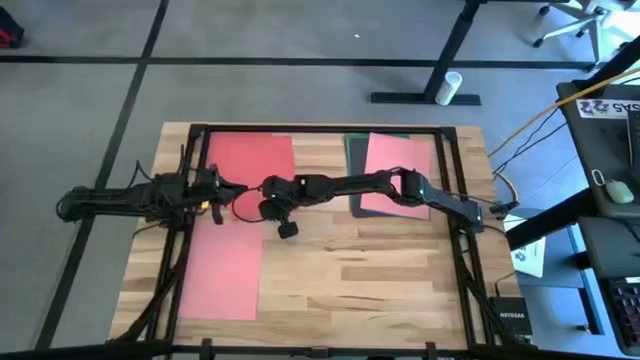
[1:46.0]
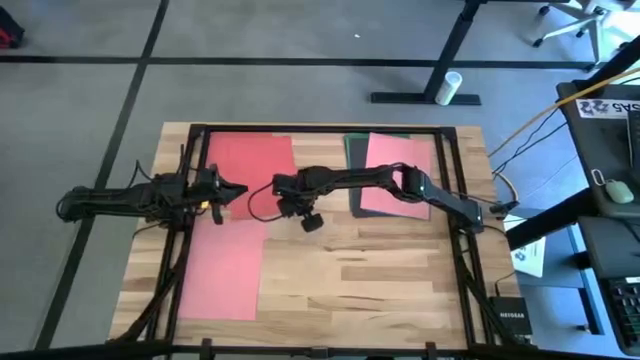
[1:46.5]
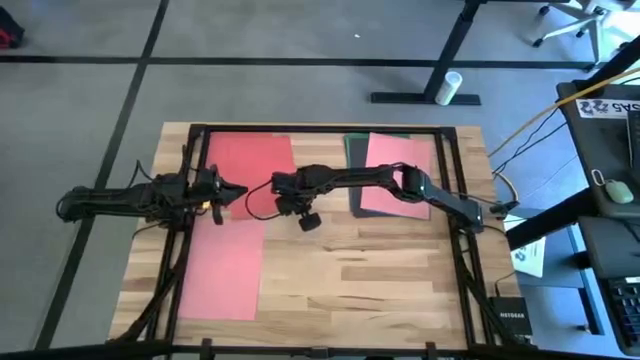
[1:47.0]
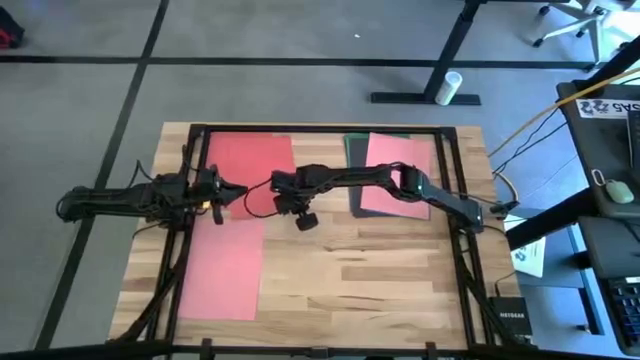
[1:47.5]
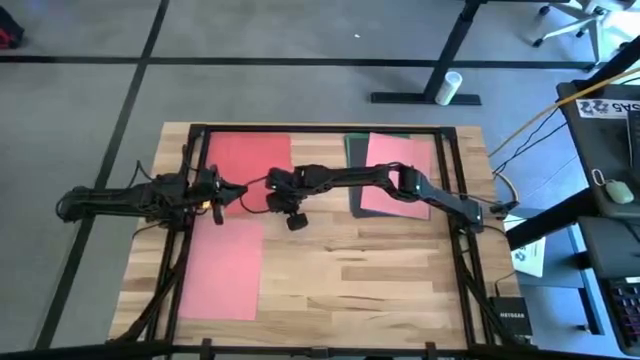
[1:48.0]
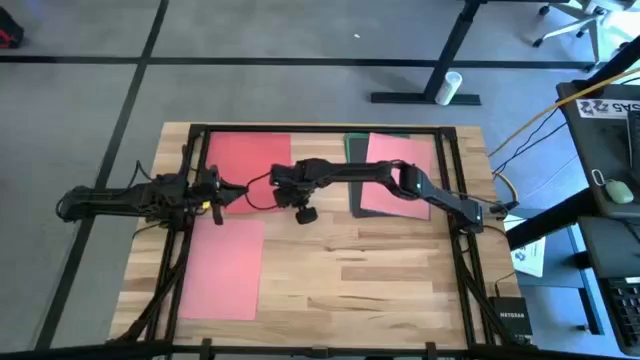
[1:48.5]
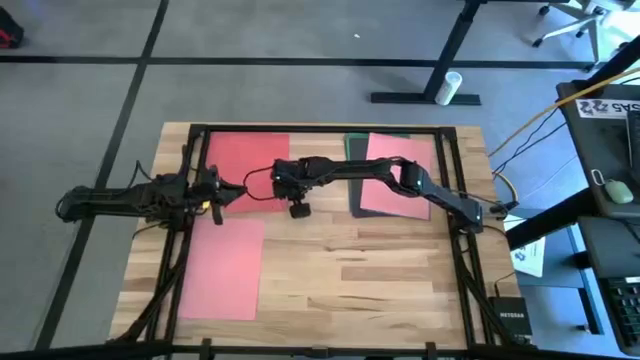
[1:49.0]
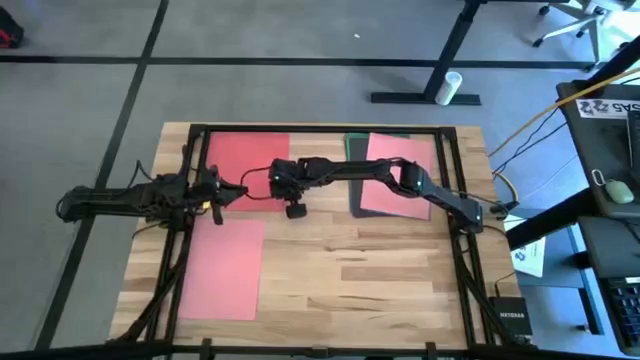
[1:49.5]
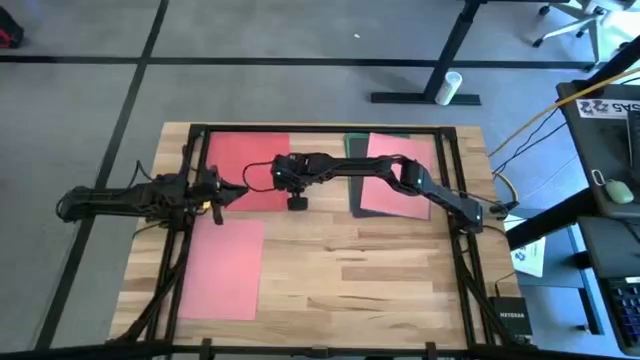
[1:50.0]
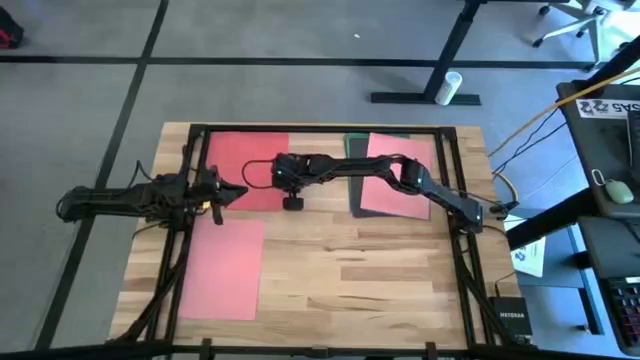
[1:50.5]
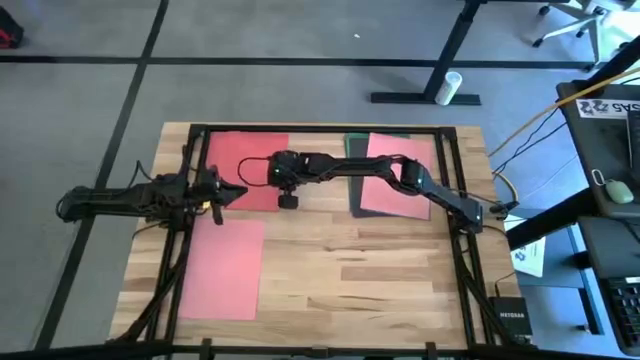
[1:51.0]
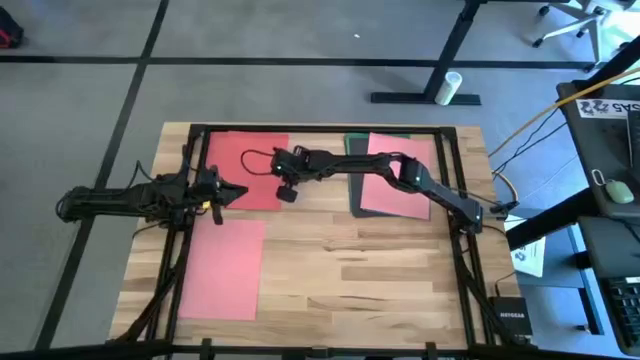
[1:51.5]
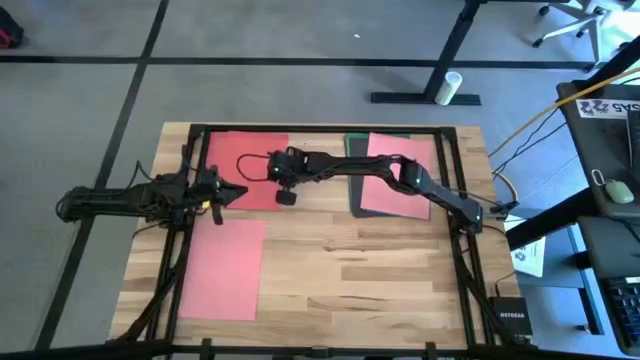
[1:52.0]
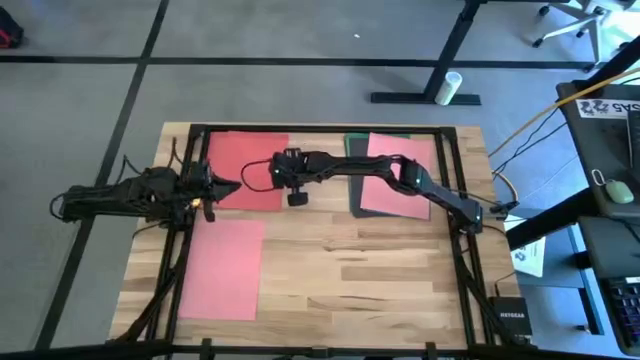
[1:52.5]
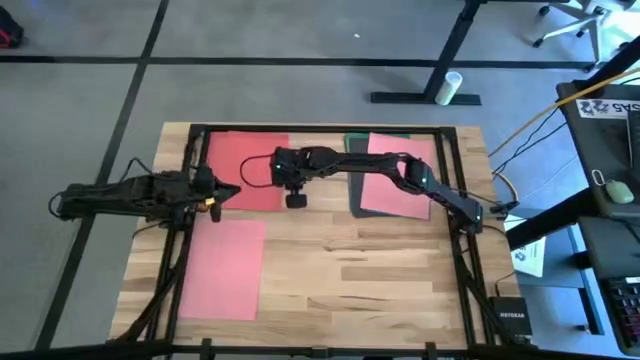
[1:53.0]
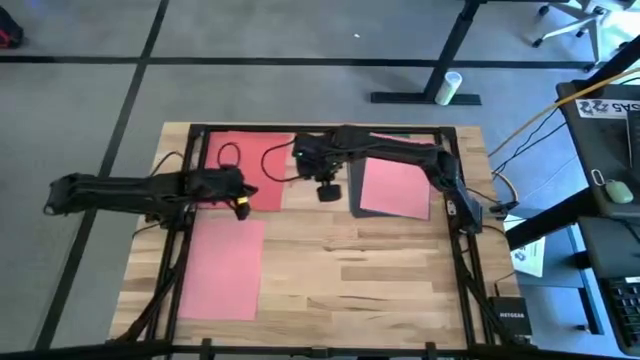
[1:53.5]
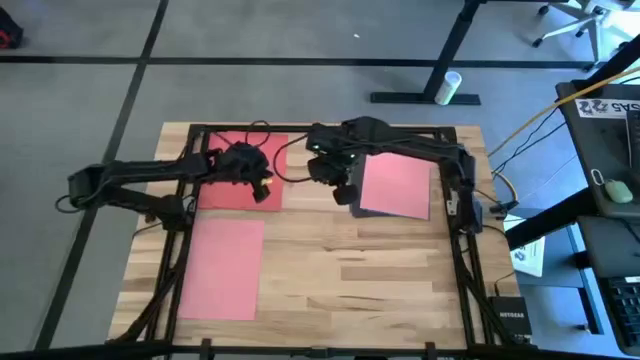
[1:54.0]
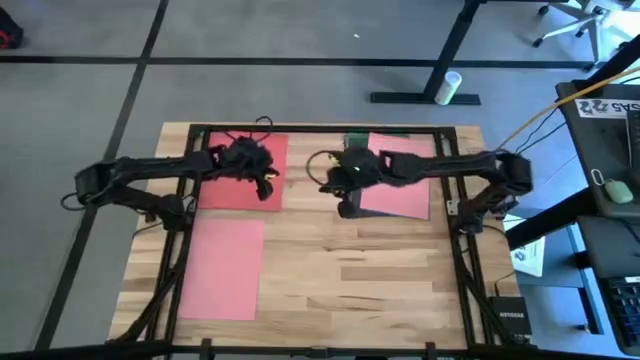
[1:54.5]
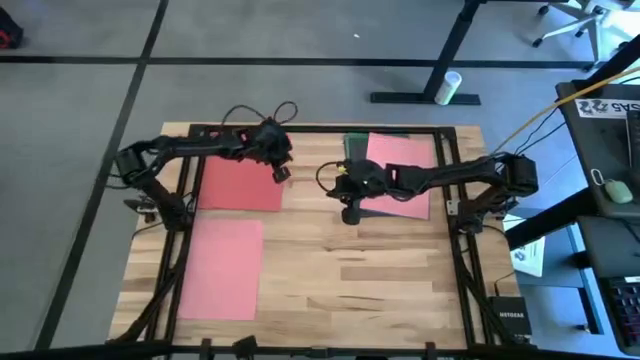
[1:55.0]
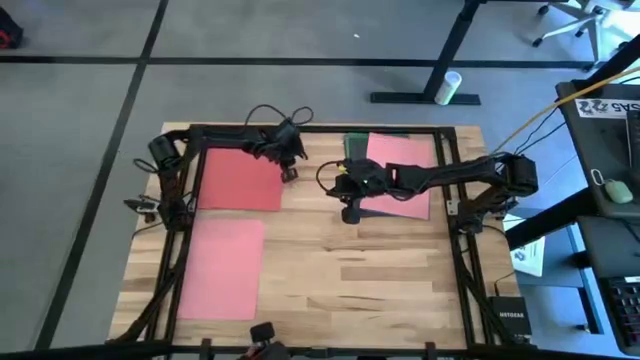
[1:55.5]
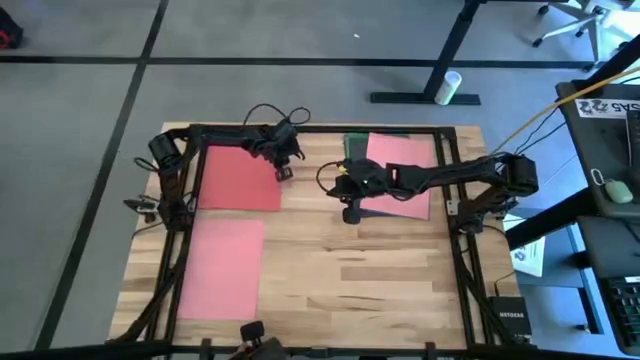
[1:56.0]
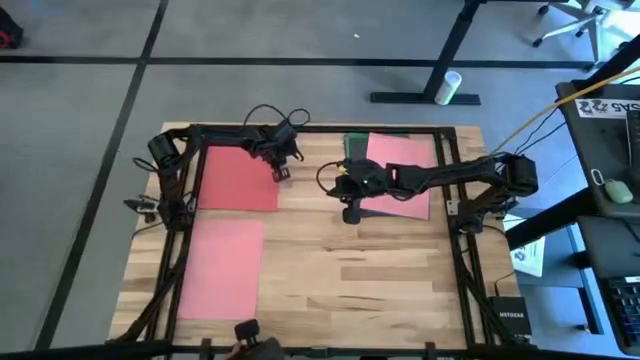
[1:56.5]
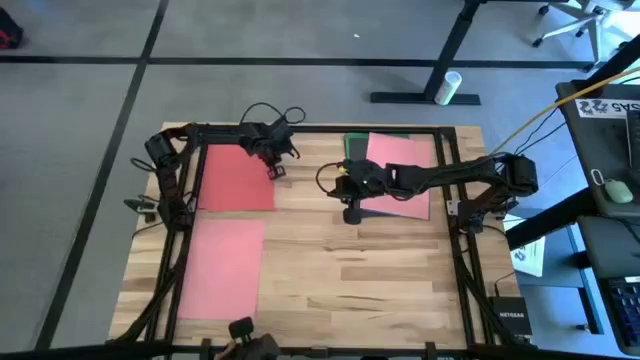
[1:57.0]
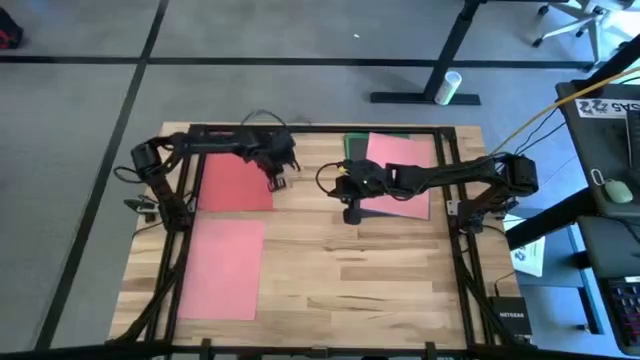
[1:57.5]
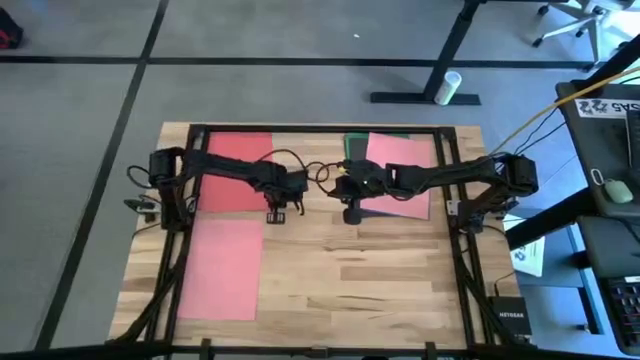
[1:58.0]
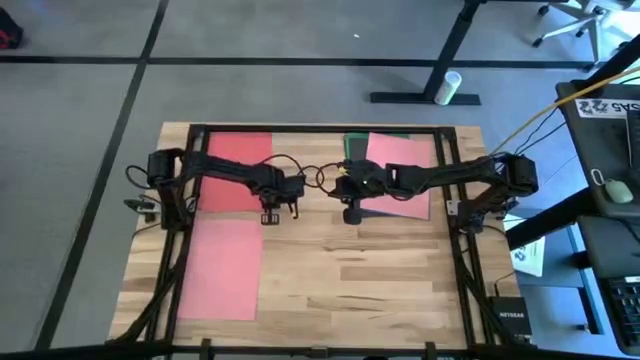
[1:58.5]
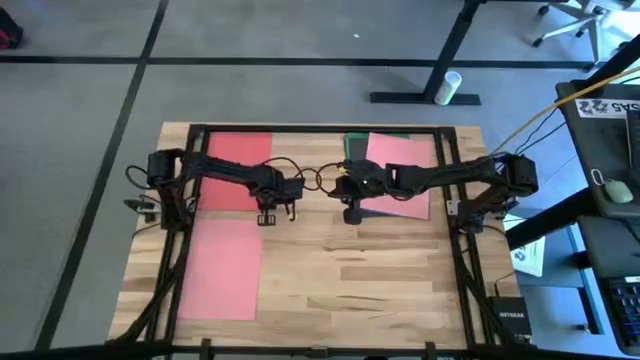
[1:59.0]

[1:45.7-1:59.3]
Task: Organize paper
Stack the red paper on top of the red papers

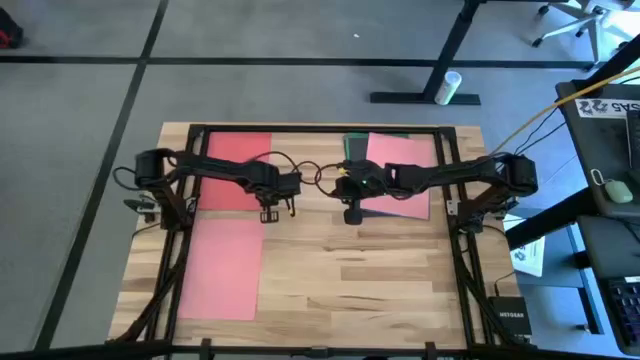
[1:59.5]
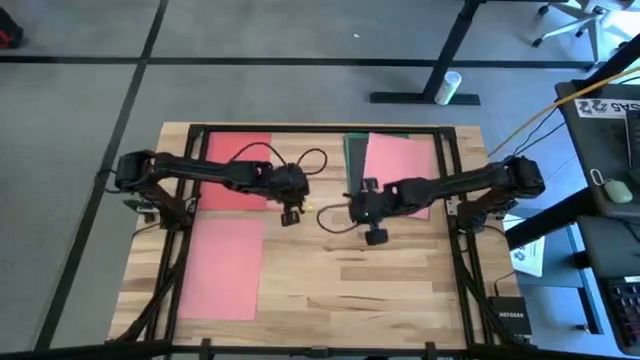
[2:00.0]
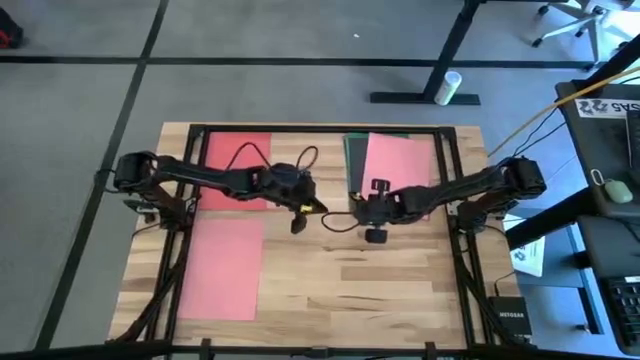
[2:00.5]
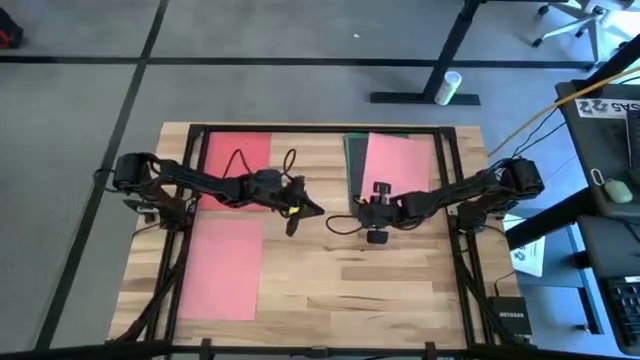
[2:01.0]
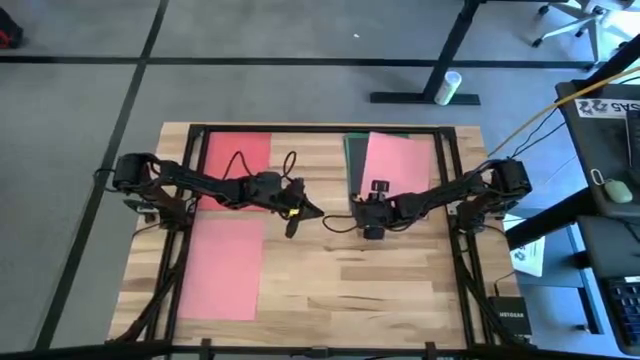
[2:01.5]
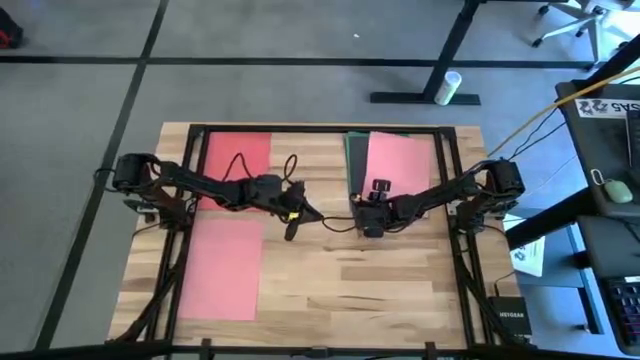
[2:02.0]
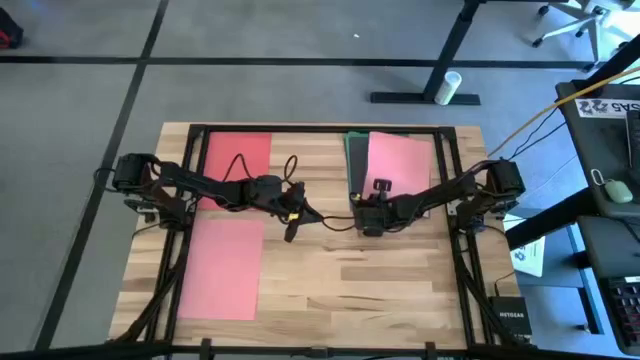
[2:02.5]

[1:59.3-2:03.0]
Stack the pink paper on top of the pink papers

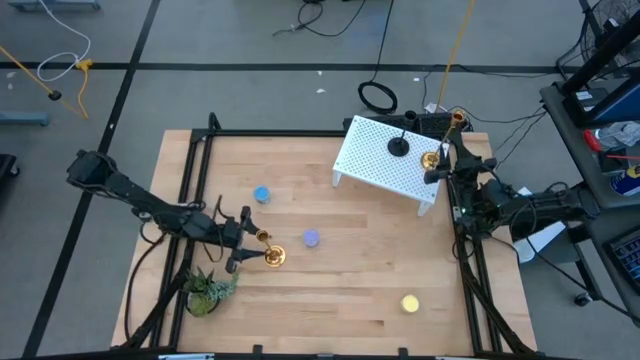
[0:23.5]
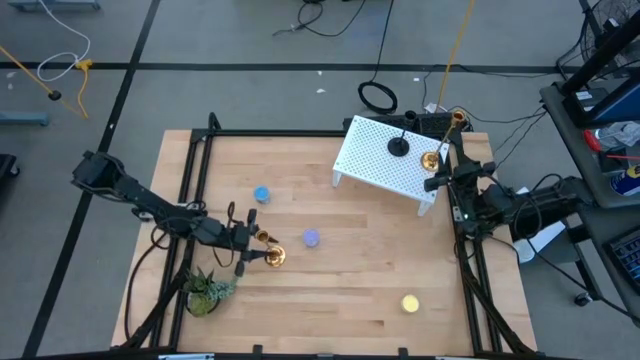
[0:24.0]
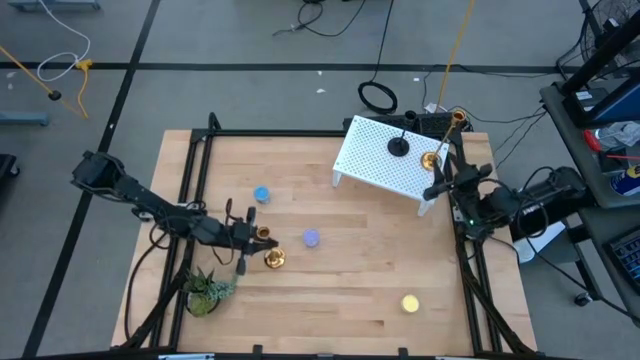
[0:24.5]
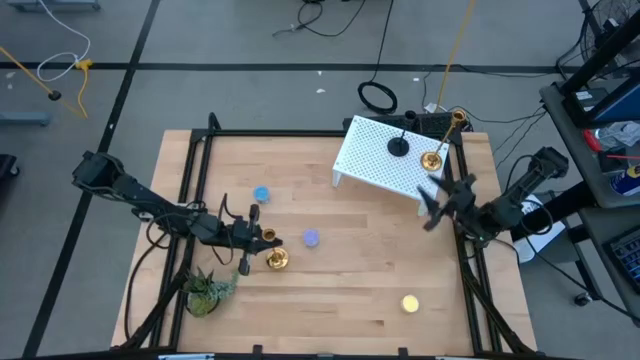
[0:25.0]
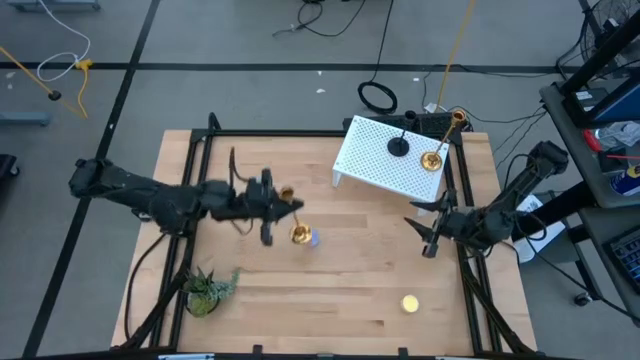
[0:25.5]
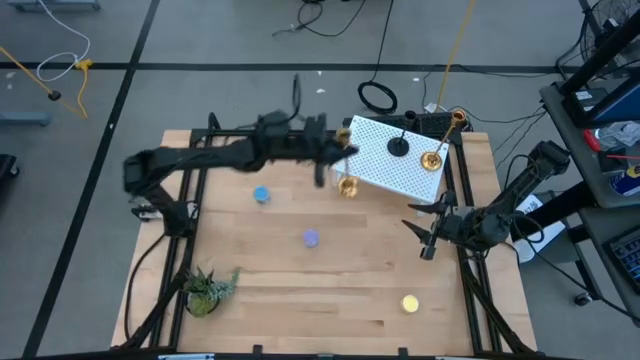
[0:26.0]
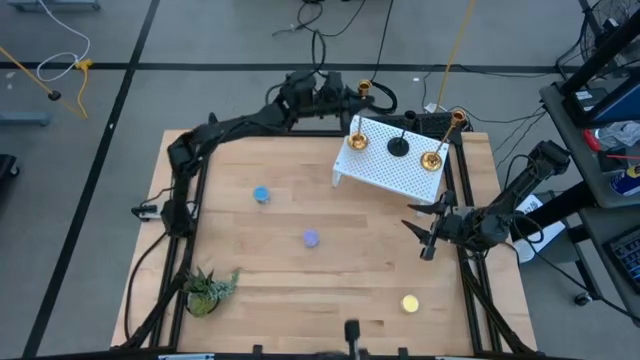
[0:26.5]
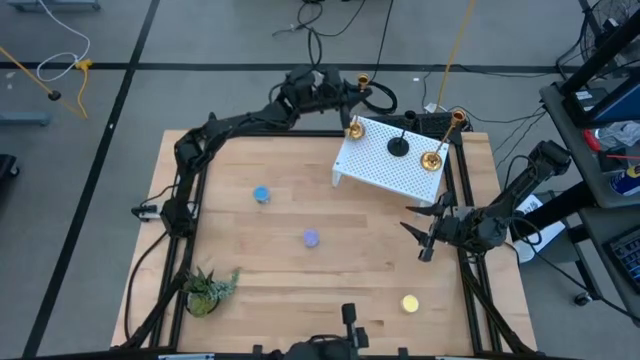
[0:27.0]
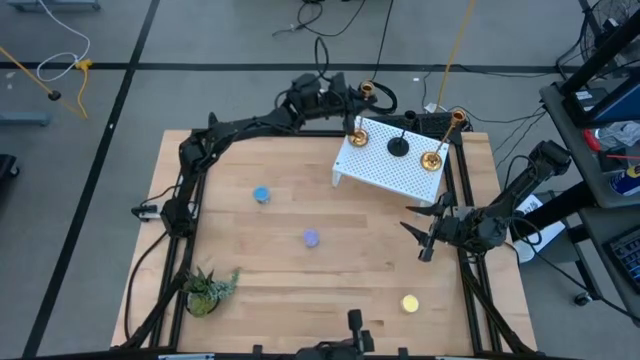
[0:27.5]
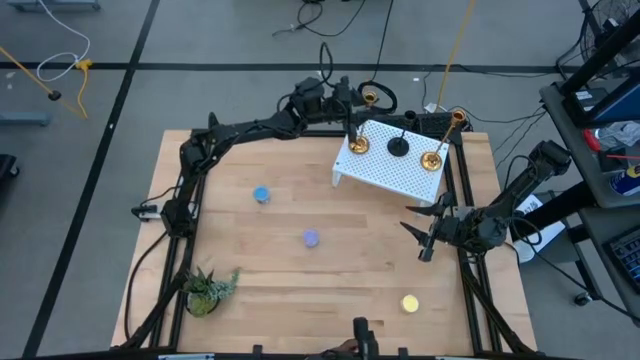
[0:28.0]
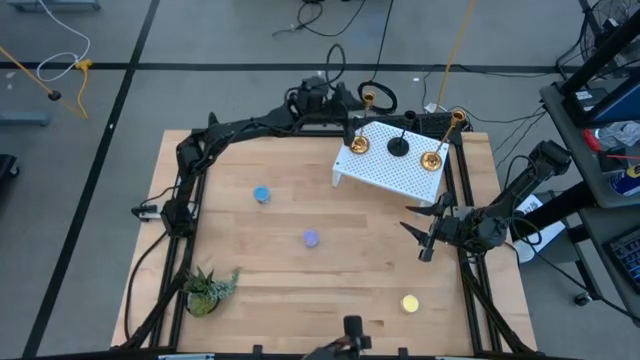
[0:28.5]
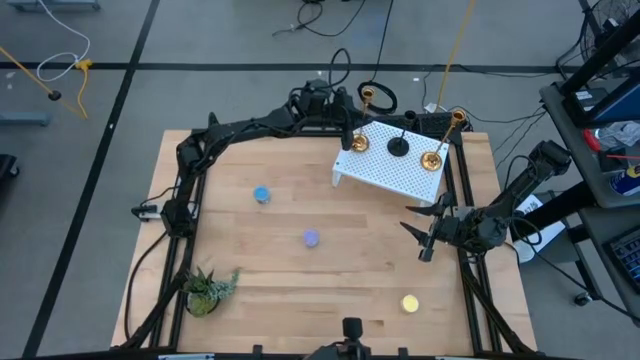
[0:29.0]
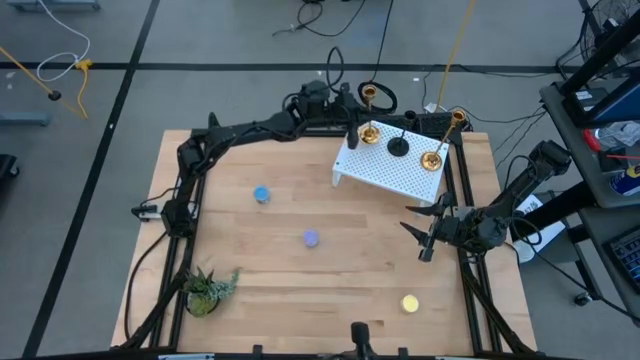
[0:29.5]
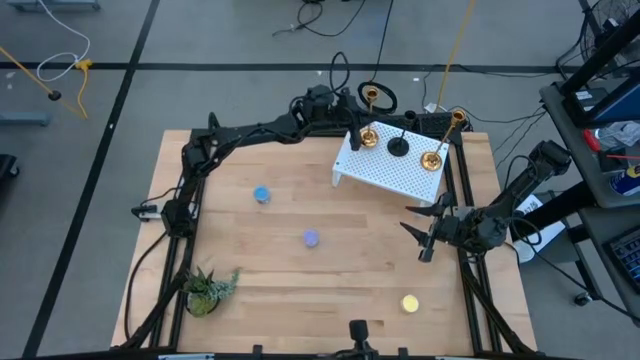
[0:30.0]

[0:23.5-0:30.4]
Task: Pick & Place candle stick holders
Put the gold candle holder on the shelf aligned with the gold and black candle holders
